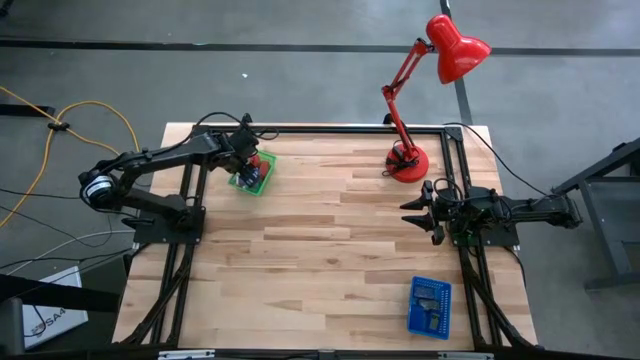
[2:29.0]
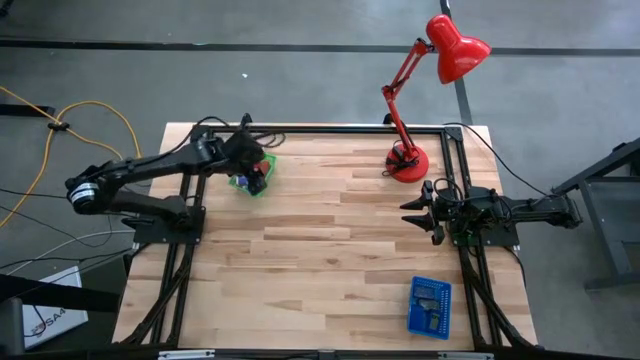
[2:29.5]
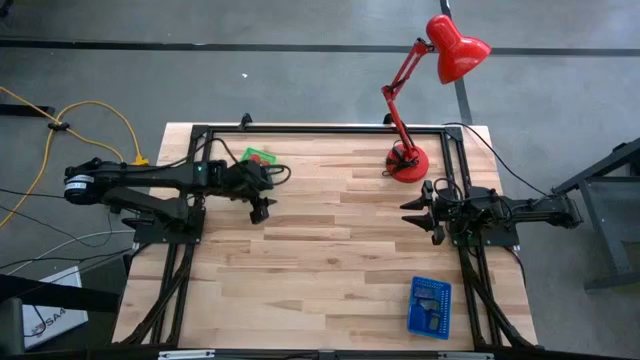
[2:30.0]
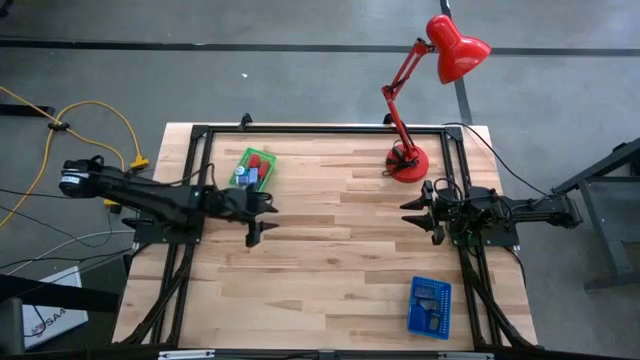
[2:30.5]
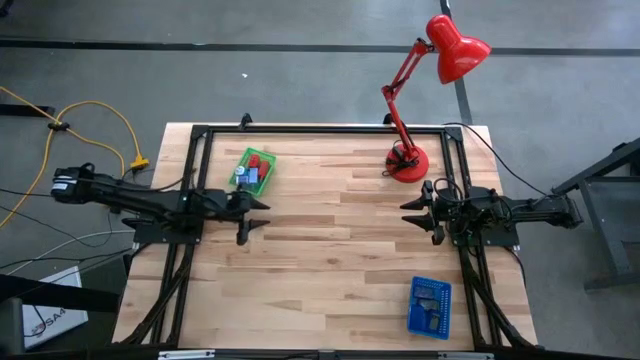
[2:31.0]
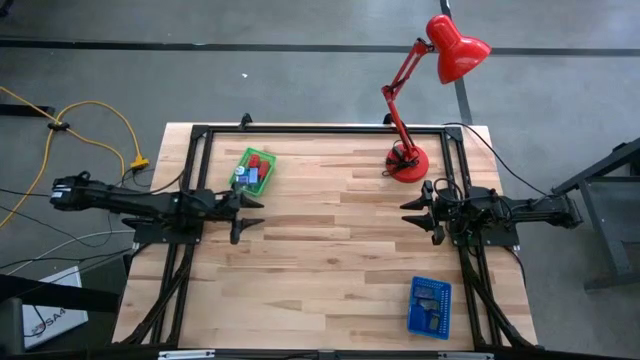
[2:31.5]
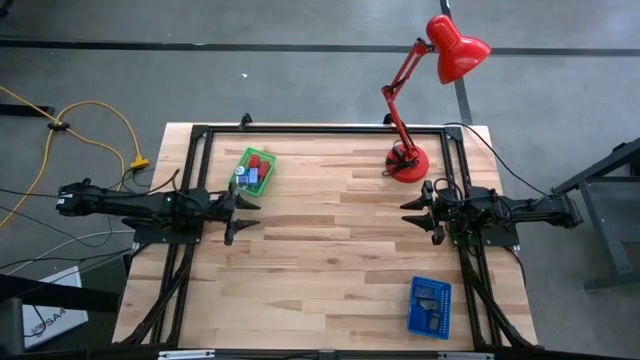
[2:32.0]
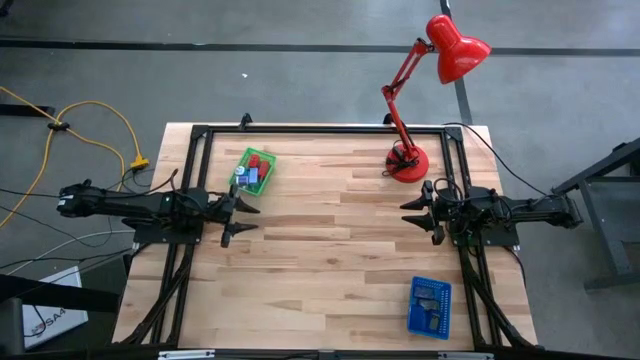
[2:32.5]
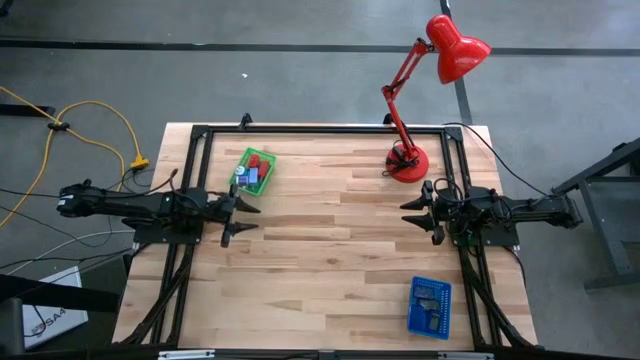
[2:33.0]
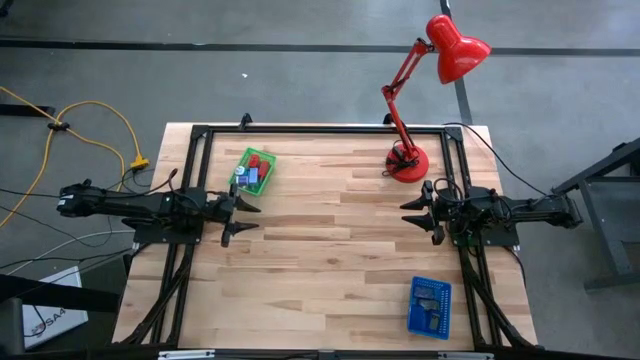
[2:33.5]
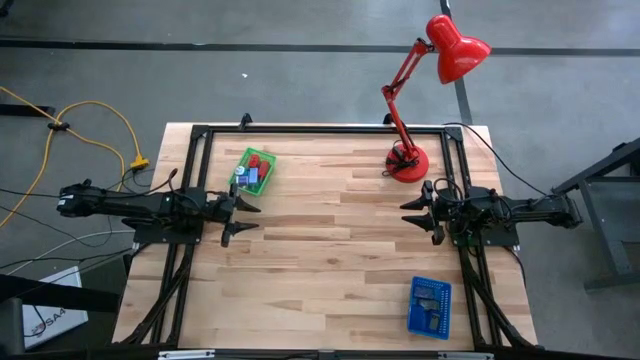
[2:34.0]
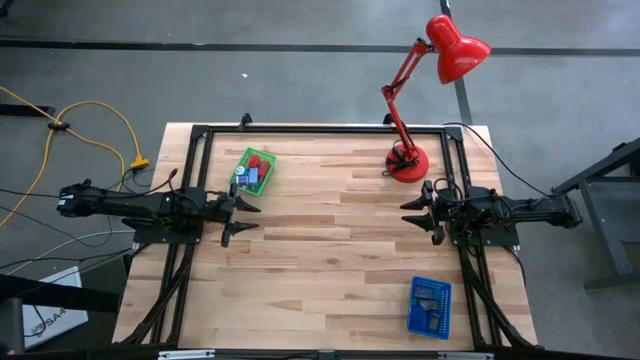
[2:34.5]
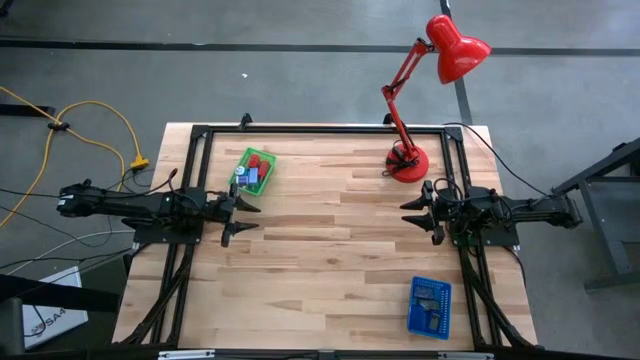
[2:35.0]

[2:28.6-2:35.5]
Task: Pick & Place Office items
Return to Home Position

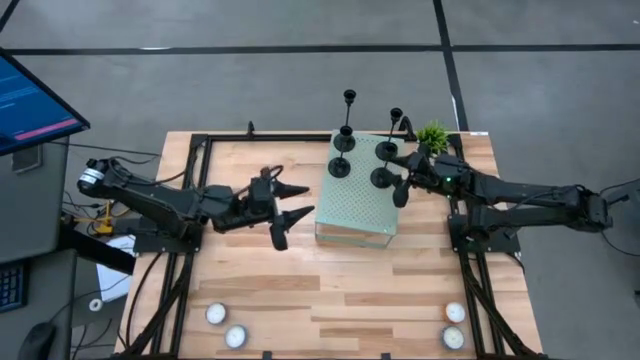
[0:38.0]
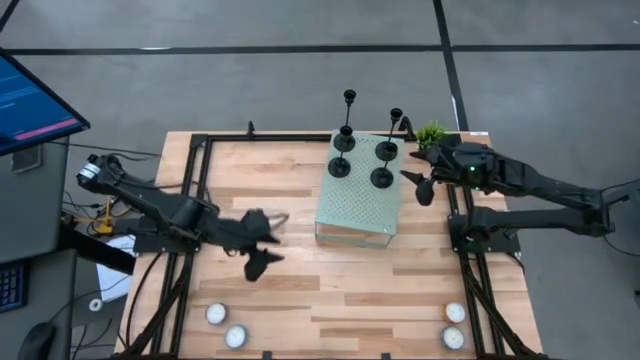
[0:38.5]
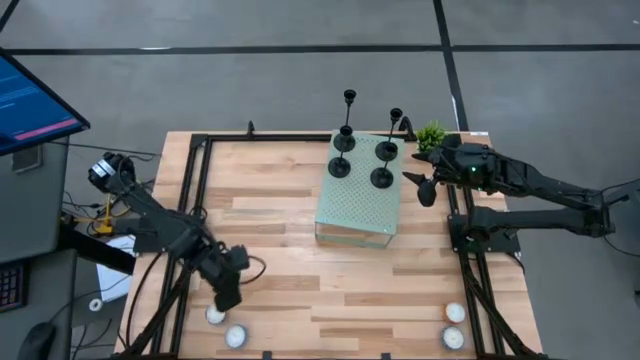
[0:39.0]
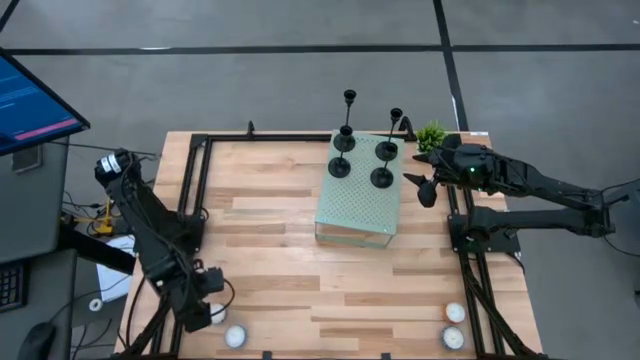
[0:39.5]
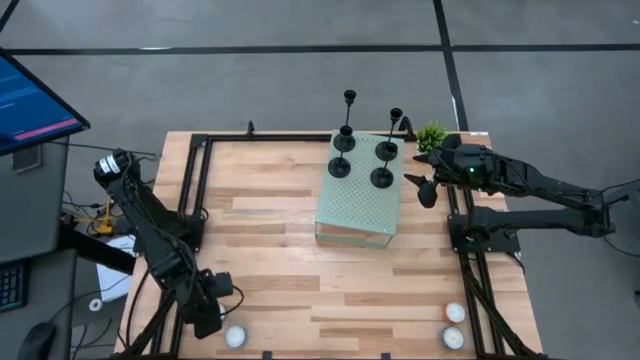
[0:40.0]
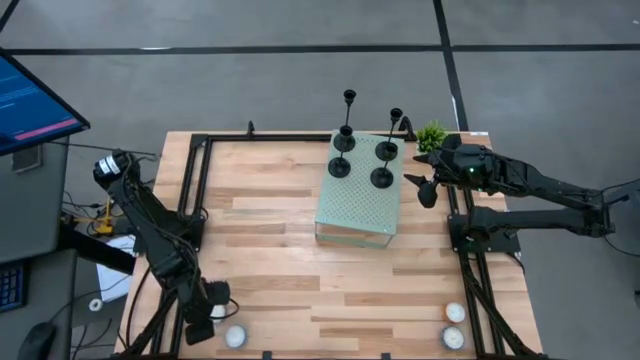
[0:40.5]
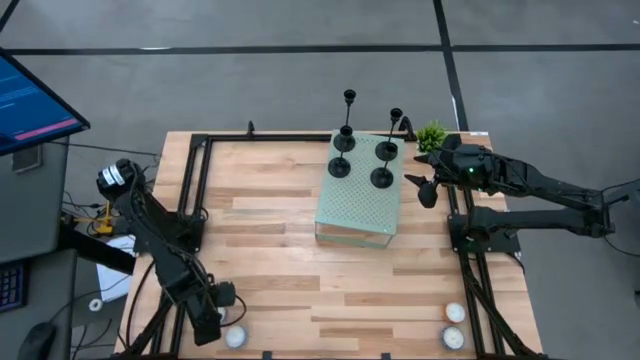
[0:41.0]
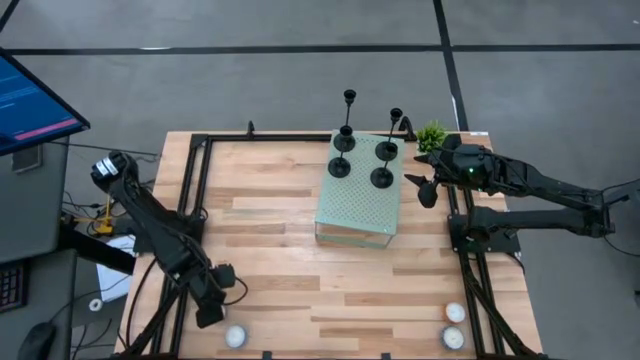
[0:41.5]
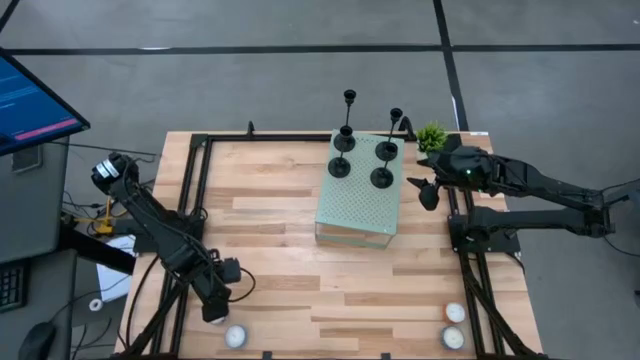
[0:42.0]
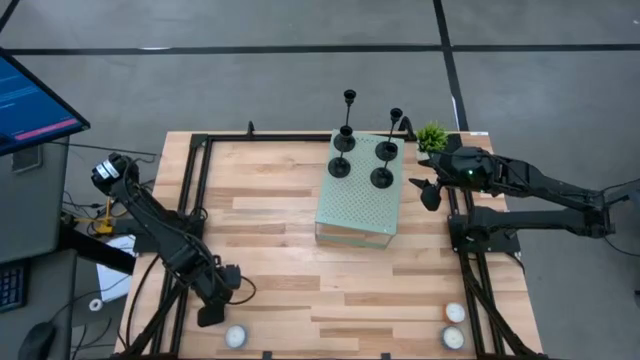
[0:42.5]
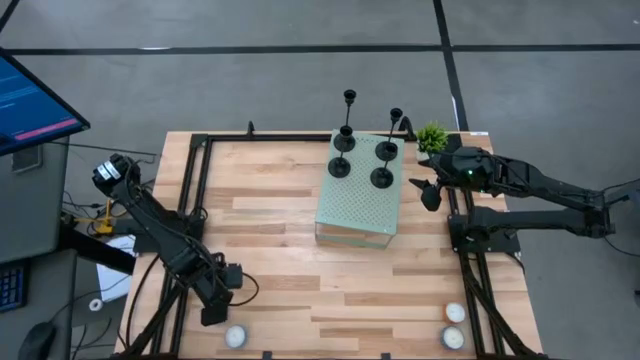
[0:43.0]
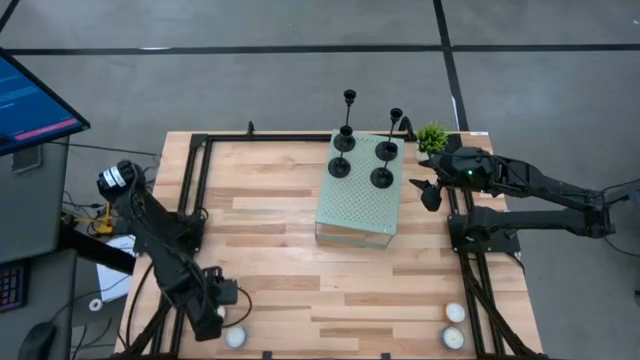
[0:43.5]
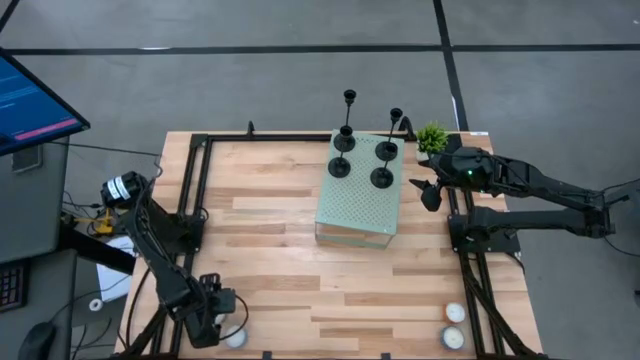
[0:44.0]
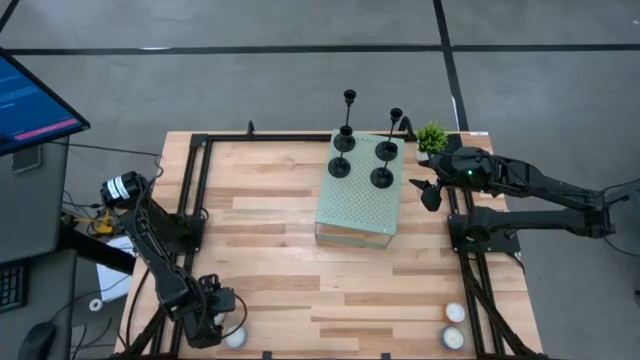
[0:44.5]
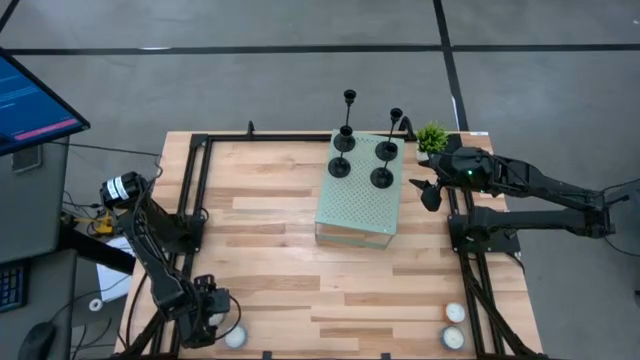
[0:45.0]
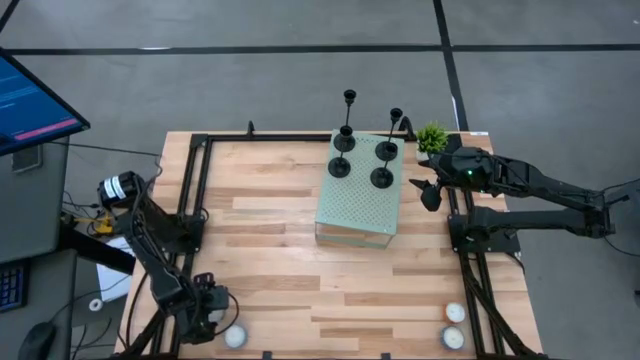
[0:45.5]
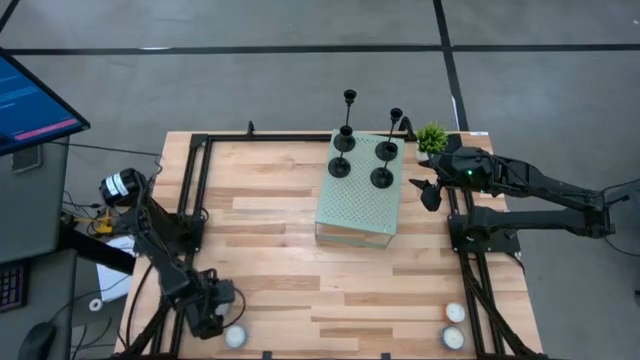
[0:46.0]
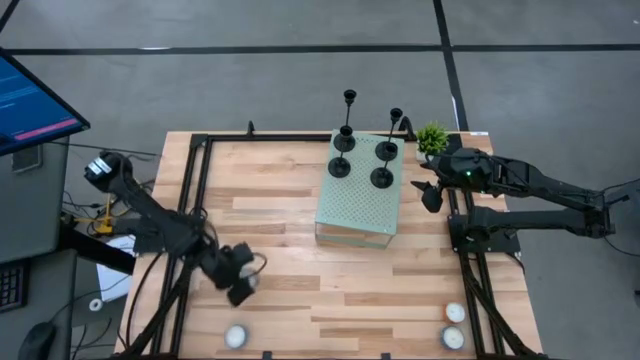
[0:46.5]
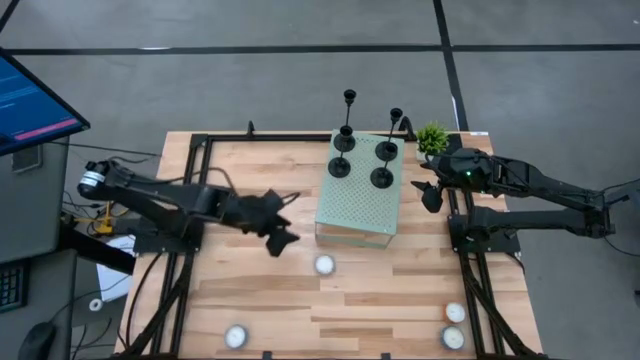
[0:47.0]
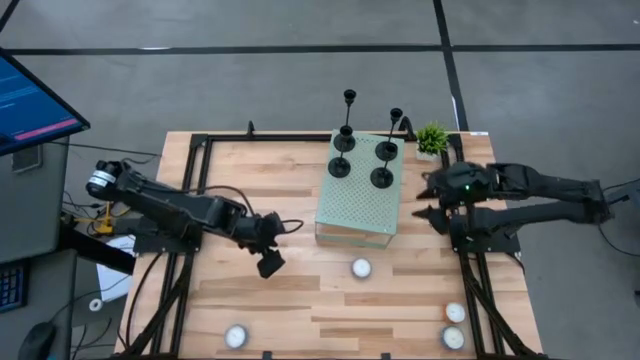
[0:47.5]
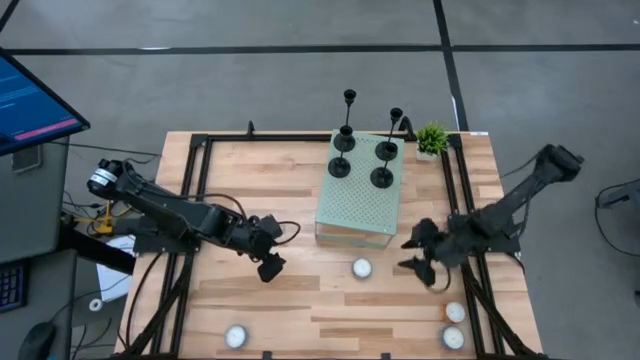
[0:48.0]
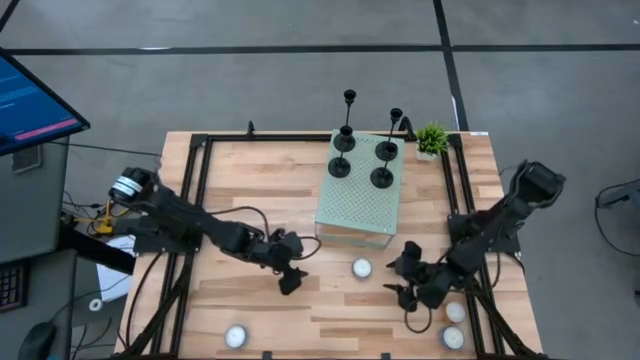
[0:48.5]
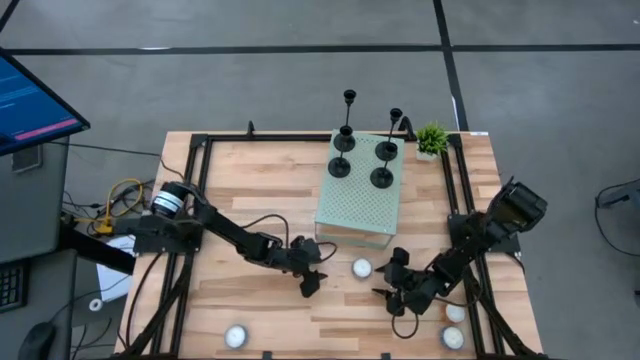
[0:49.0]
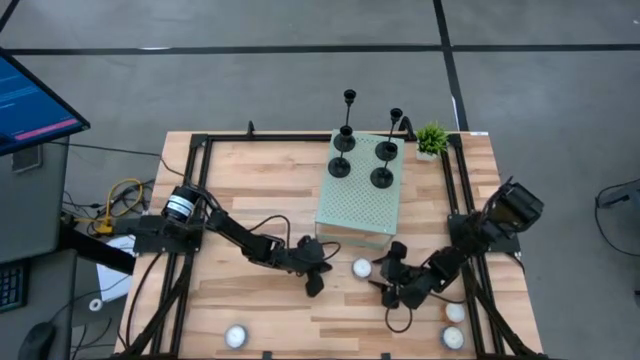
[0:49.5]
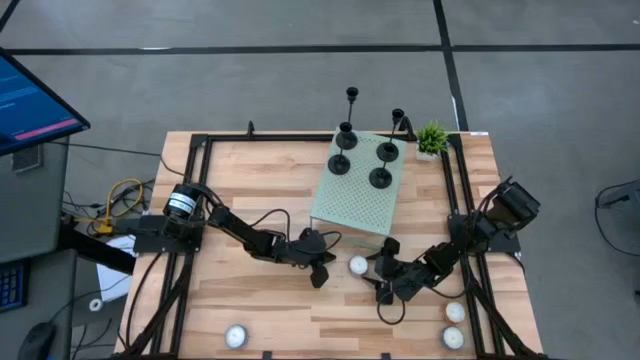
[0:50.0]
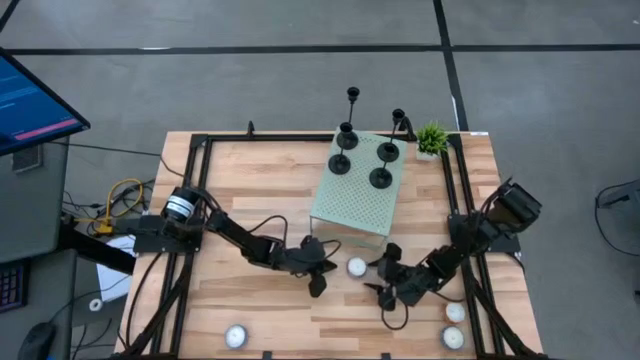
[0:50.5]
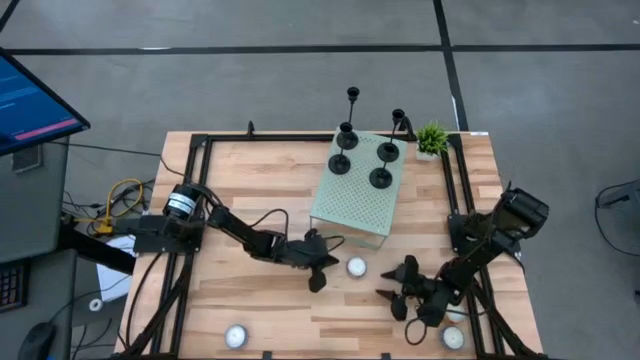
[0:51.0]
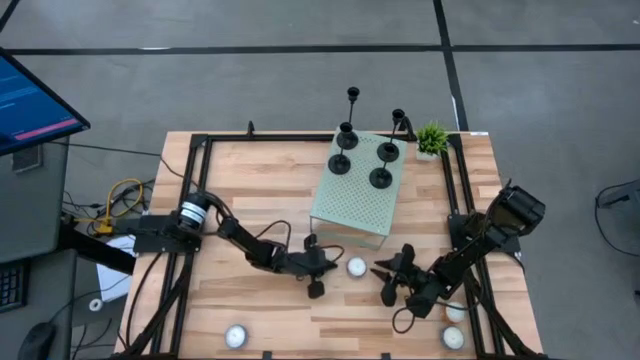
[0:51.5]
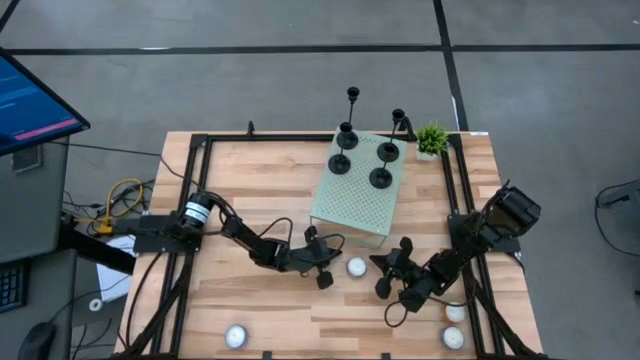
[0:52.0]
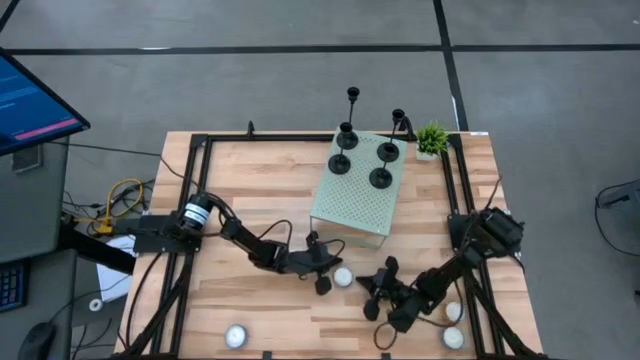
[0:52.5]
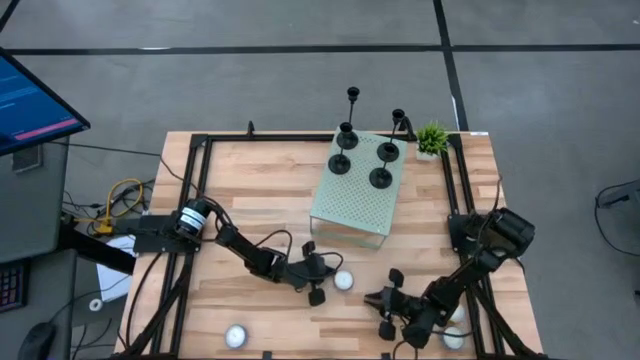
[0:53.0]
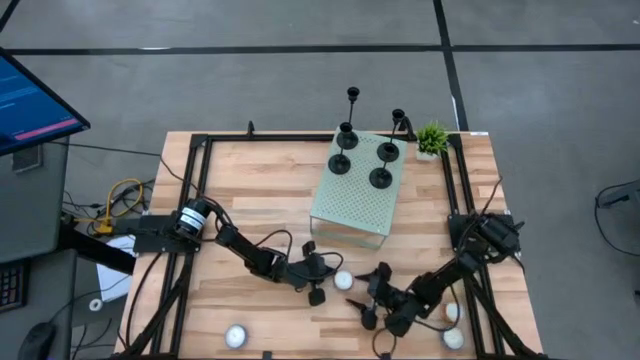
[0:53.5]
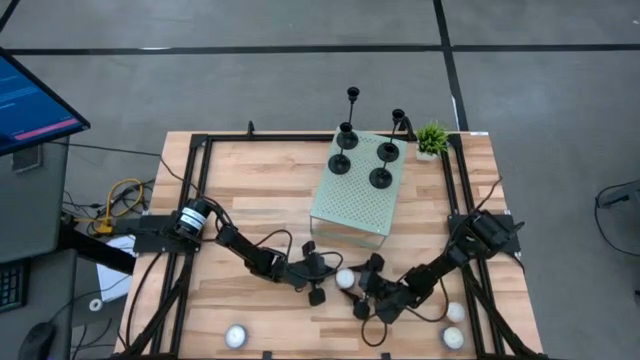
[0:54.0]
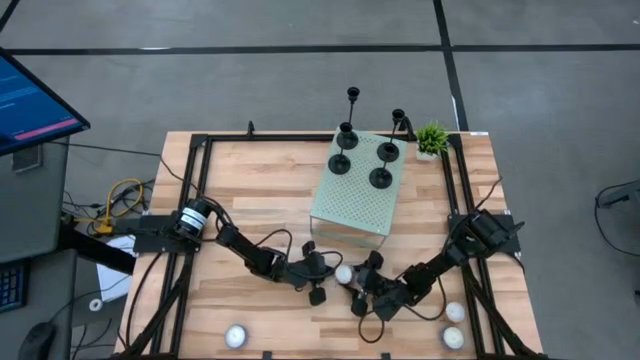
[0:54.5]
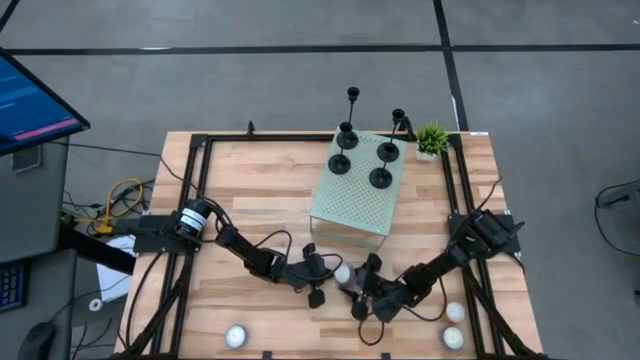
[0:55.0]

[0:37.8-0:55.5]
Task: Pick & Place candle stick holders
Put the red patterned scented candle on the shelf
